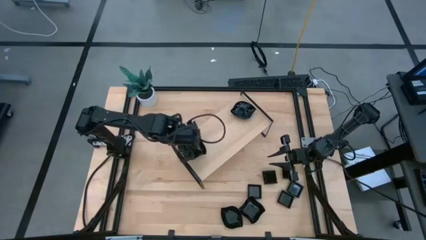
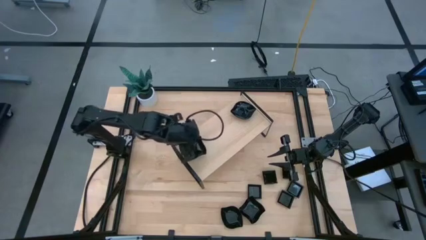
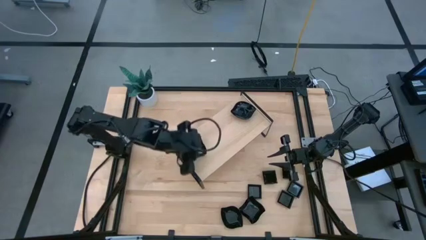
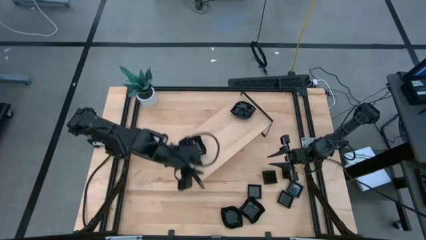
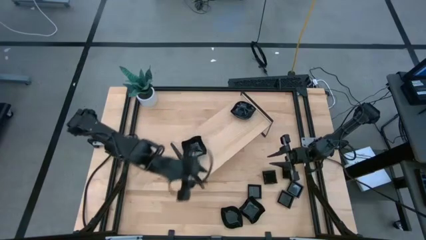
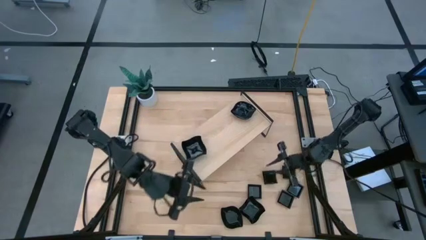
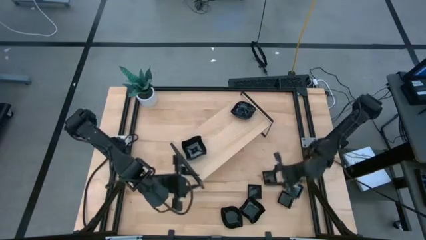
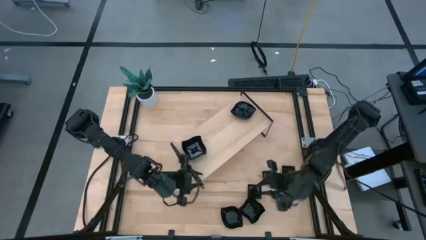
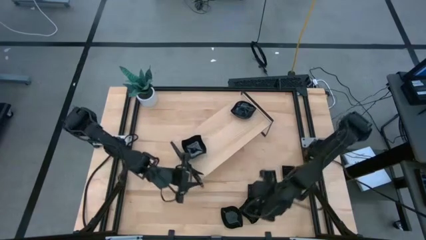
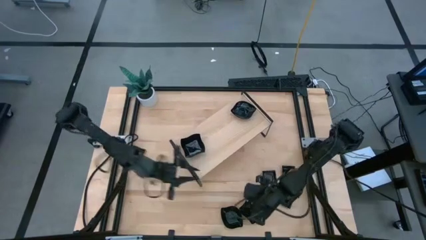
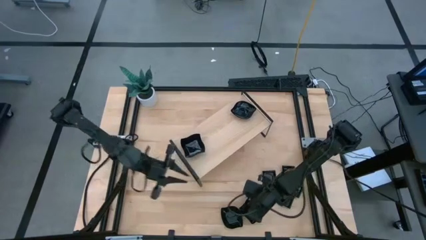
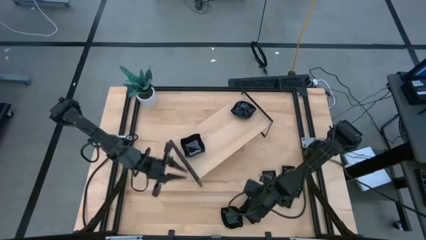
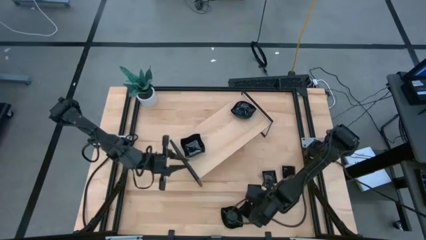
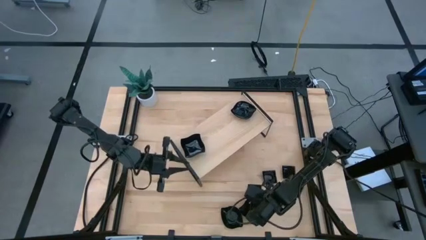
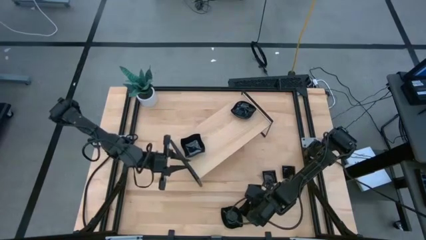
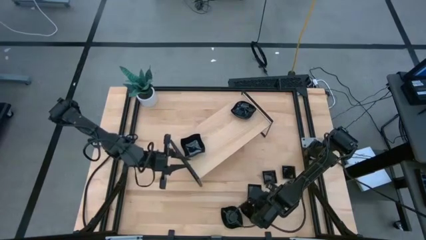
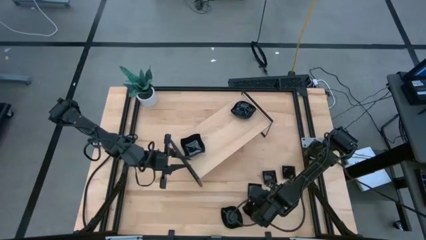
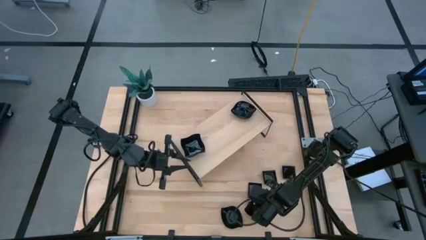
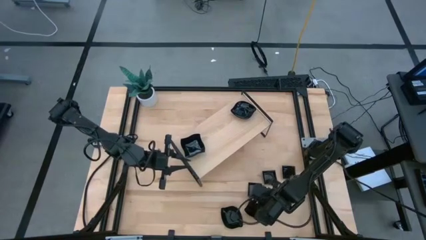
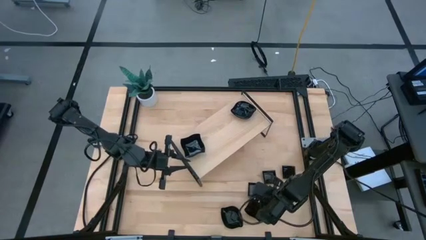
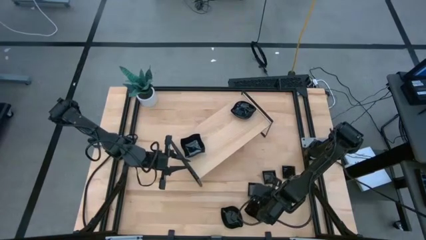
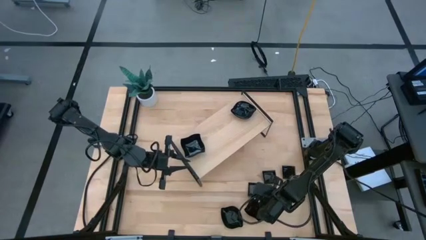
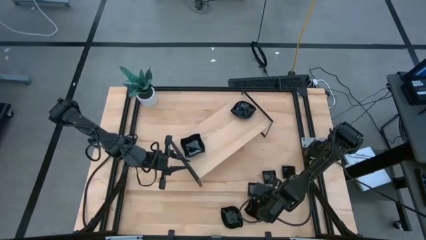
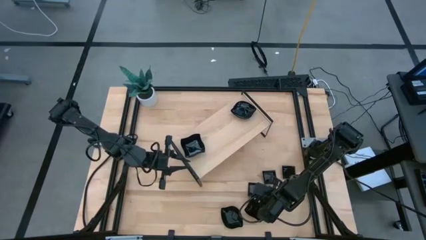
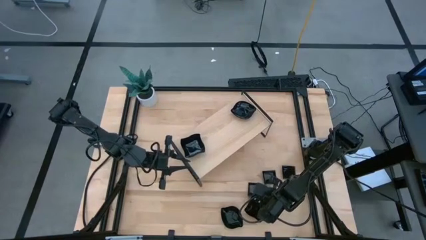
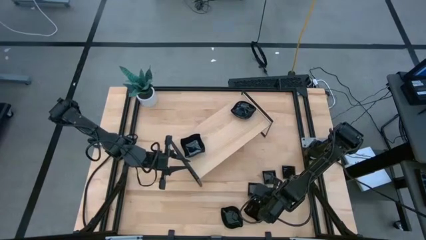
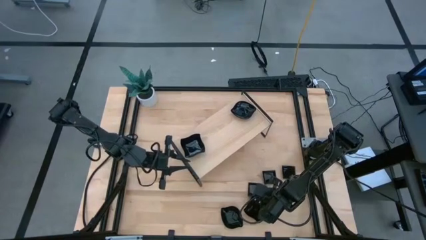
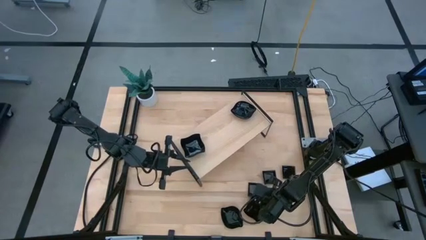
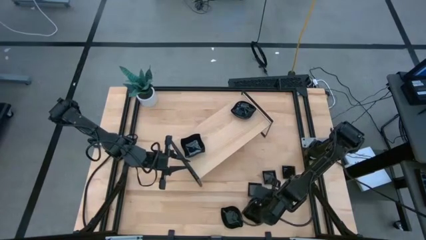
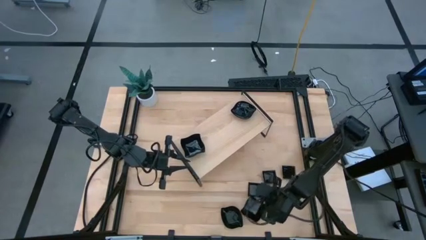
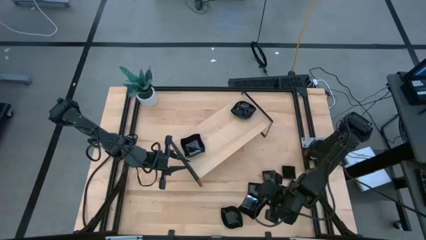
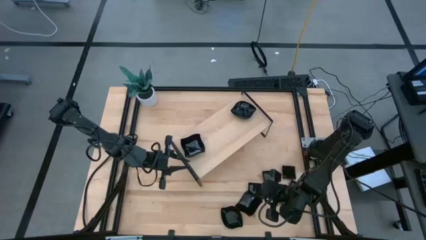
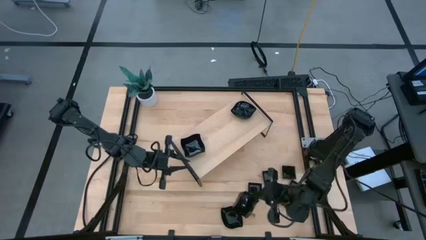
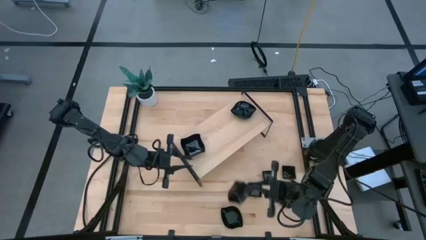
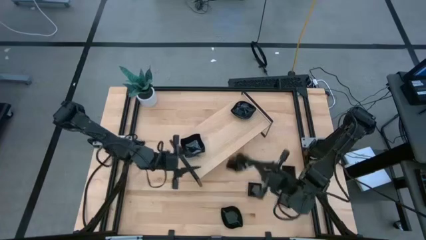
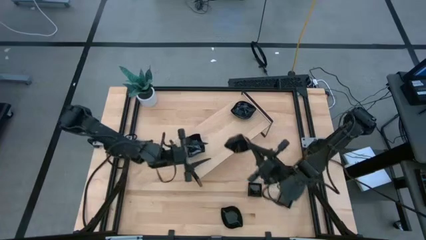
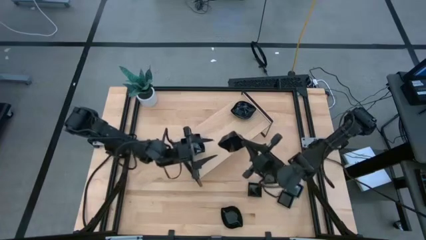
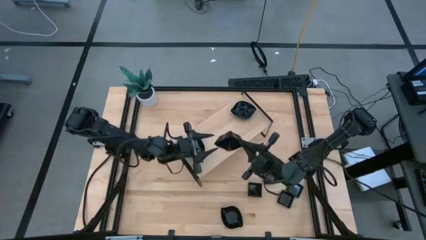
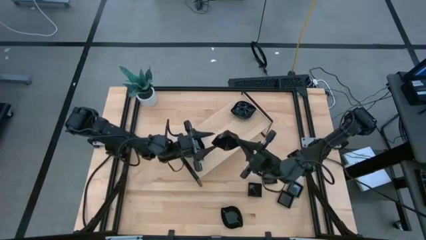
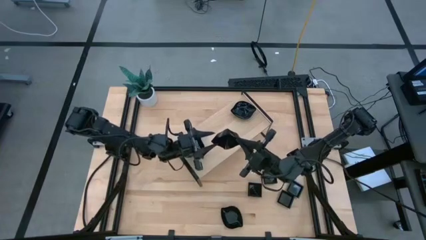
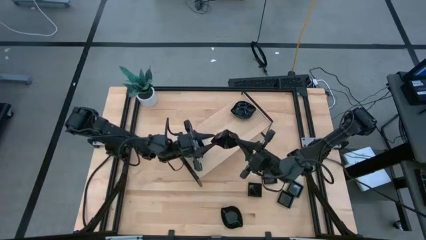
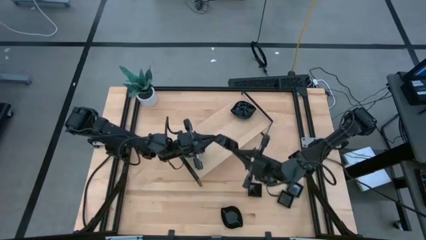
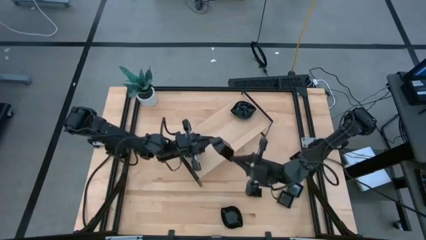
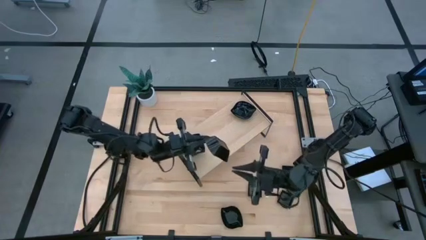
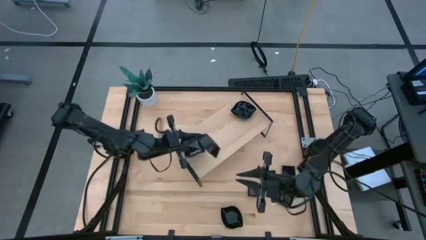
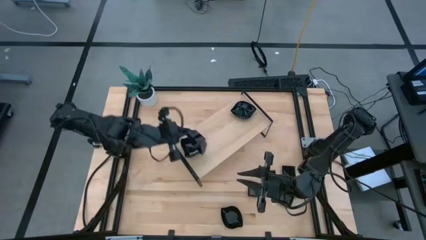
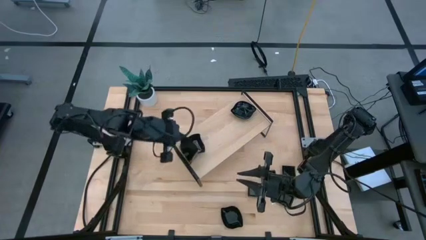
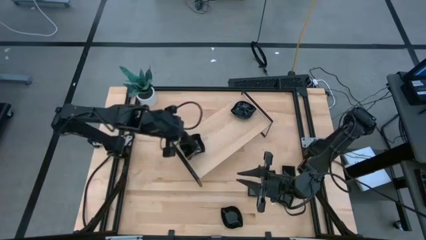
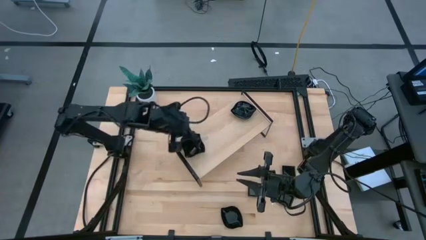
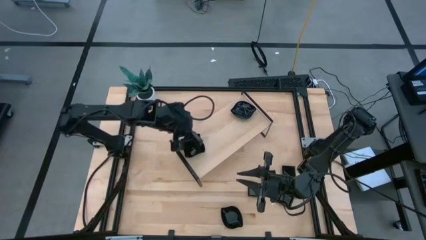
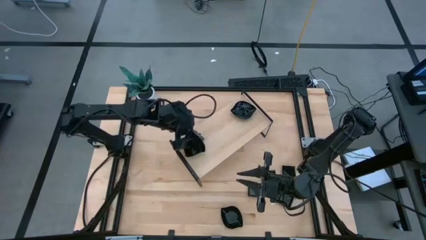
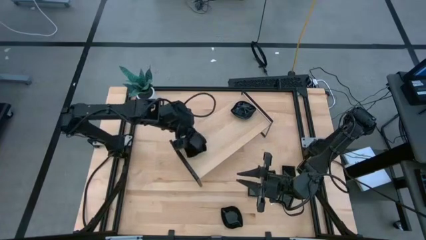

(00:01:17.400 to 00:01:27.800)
Task: Pick & Place Mini shaped plates
Stack the distorted square plate on top of the other distorted square plates on the shelf

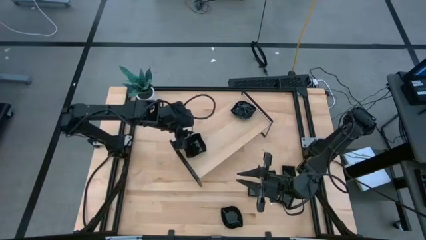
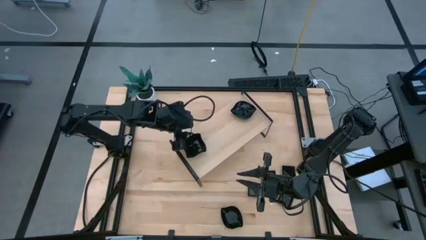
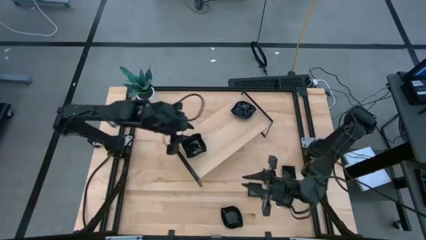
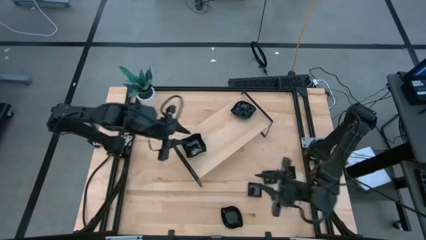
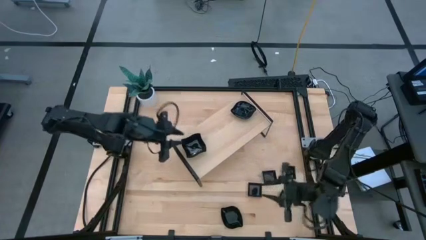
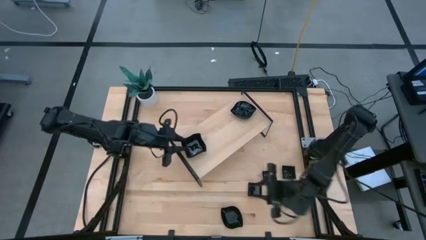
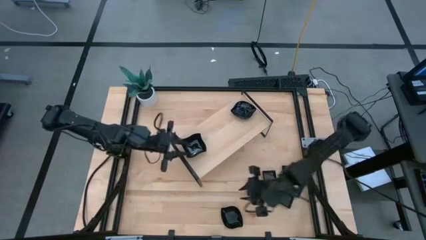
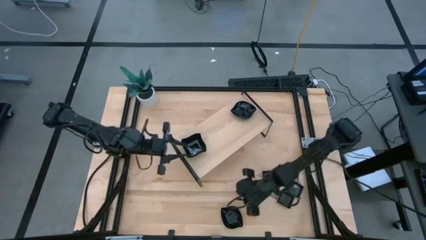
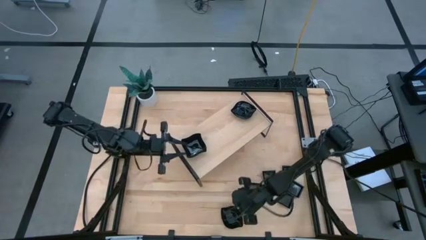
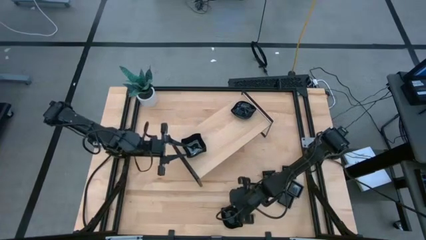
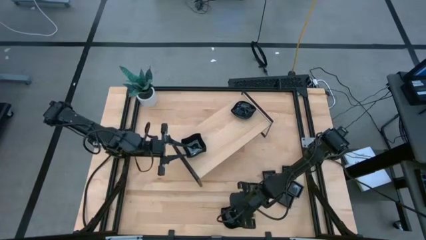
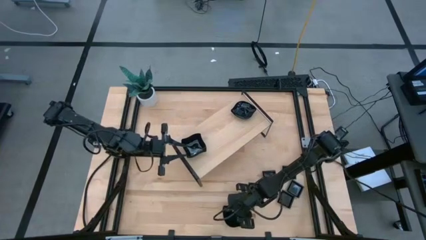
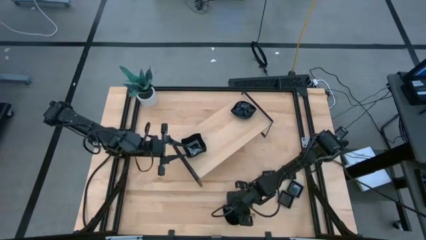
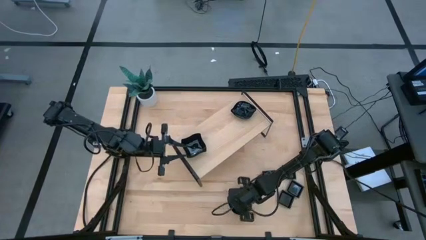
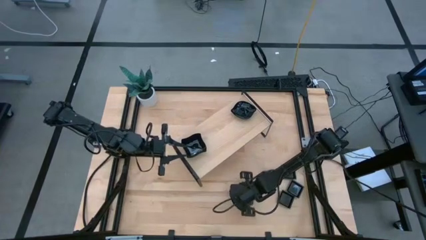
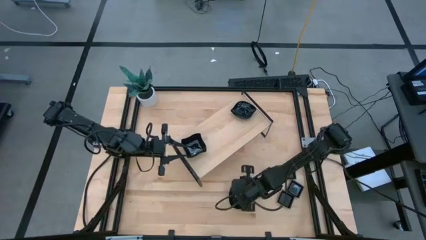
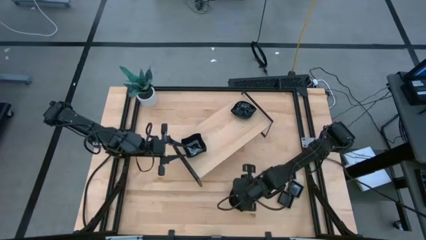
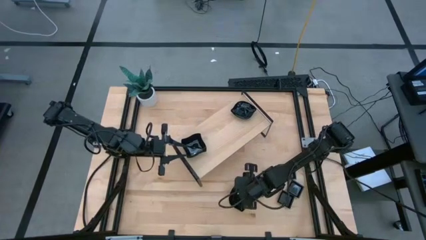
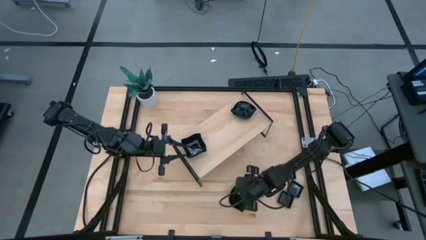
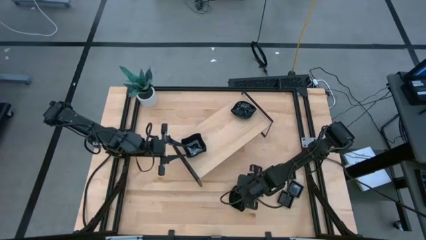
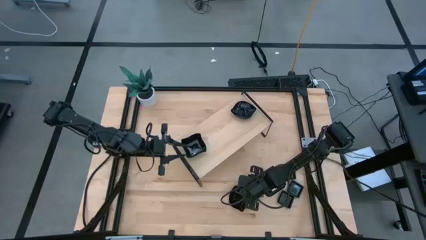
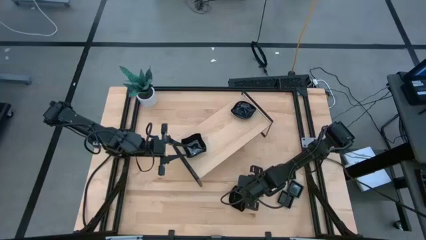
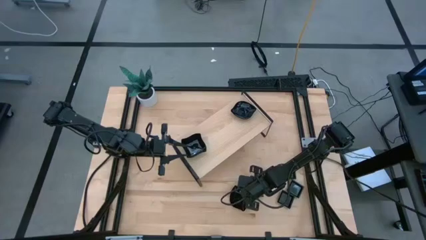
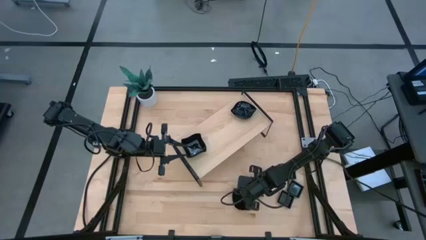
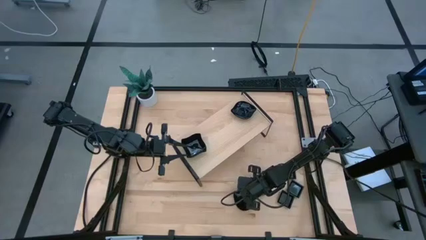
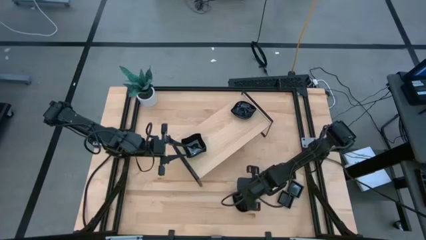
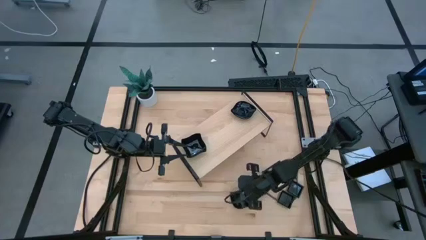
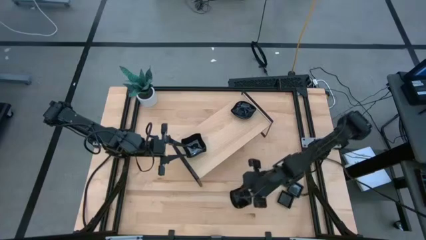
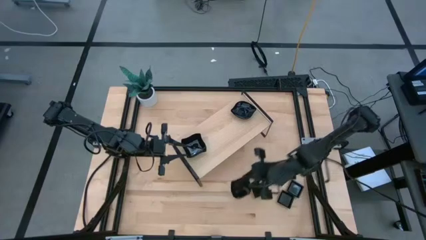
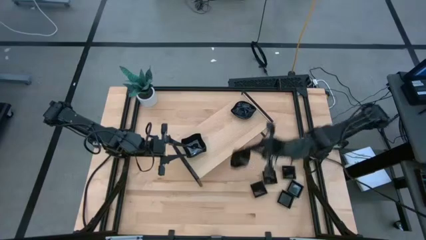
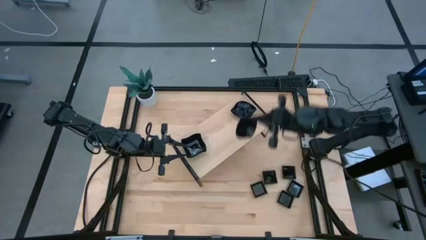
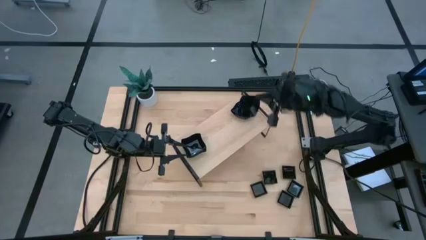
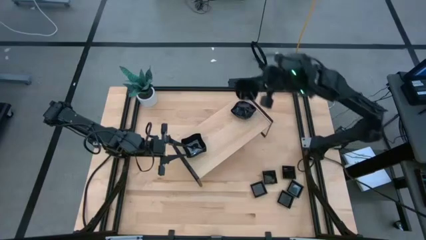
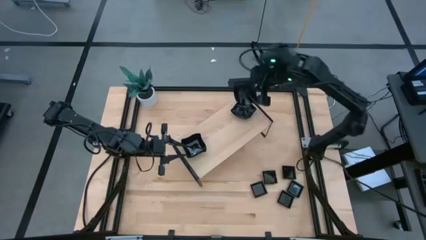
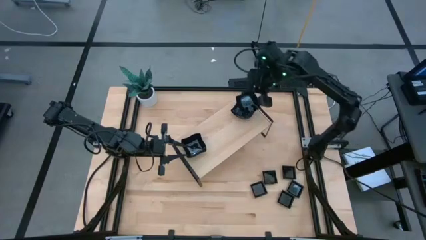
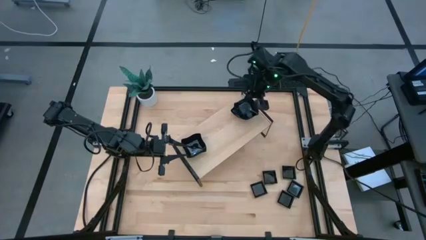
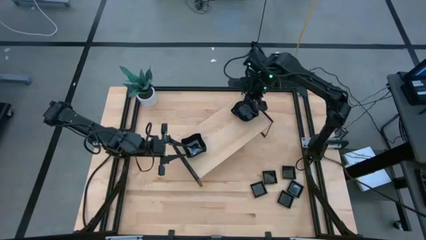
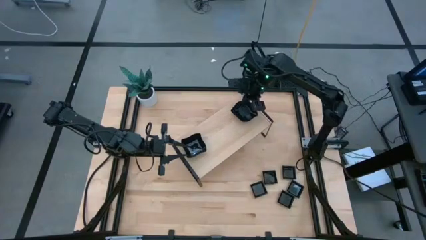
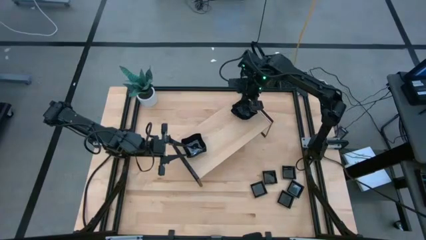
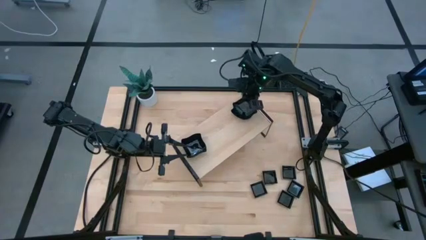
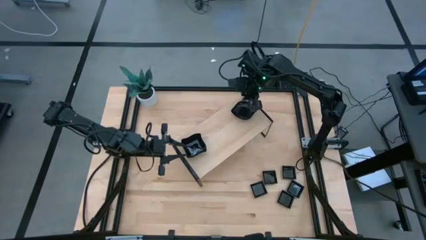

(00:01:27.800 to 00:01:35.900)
Stack the leaf shaped plate on top of the other leaf shaped plates on the shelf
